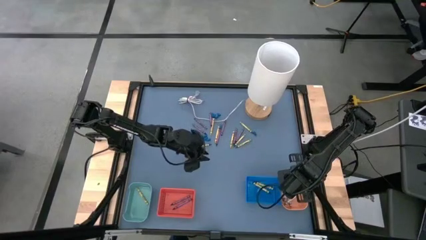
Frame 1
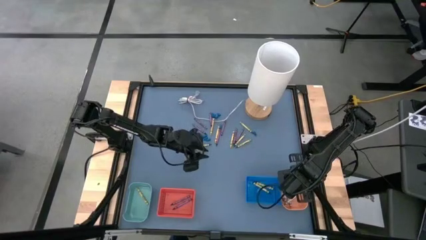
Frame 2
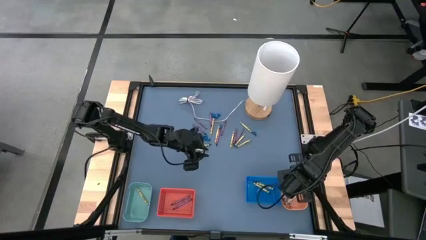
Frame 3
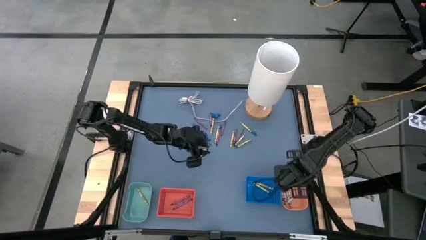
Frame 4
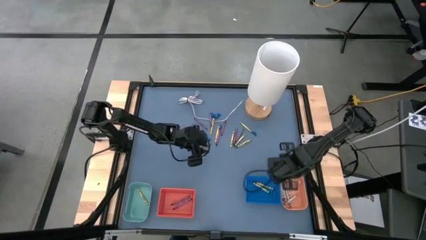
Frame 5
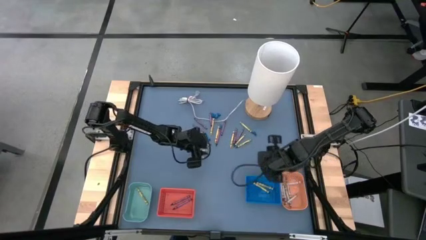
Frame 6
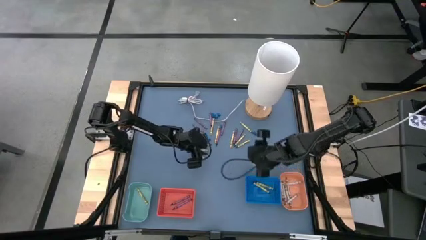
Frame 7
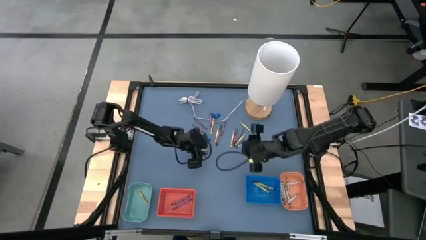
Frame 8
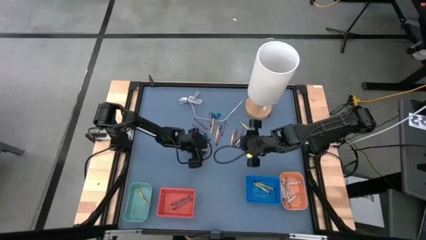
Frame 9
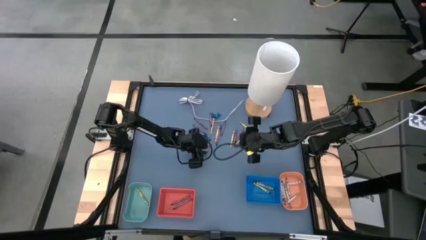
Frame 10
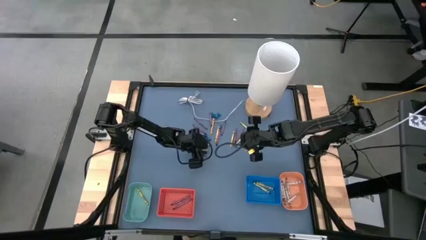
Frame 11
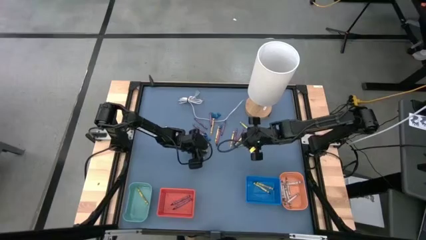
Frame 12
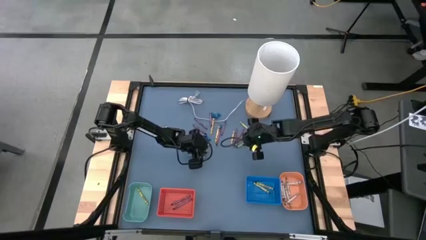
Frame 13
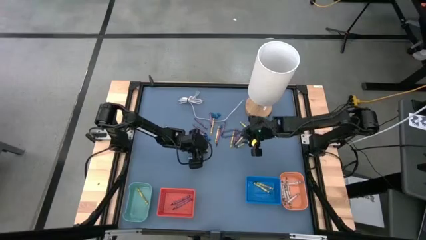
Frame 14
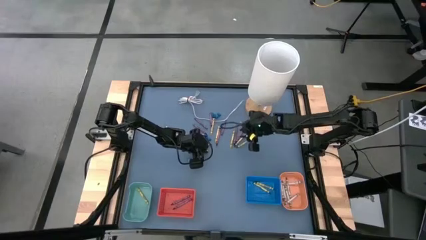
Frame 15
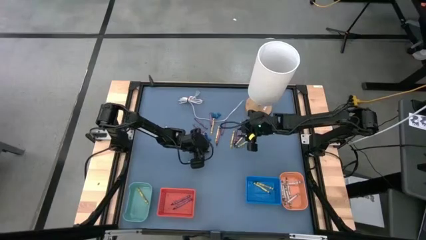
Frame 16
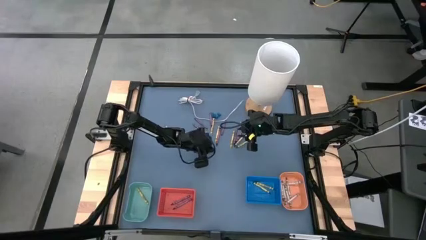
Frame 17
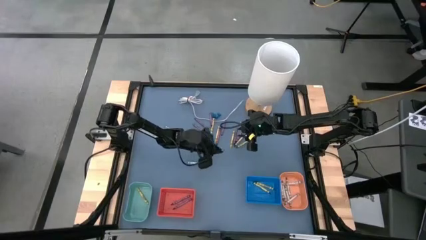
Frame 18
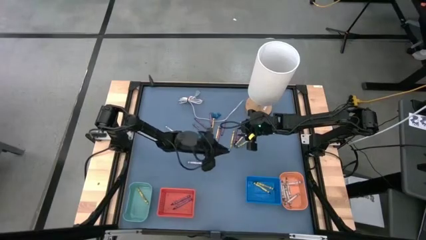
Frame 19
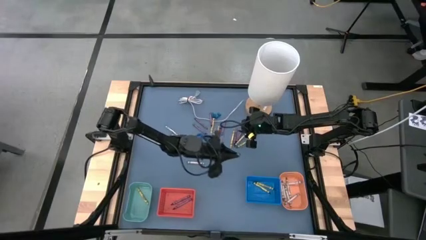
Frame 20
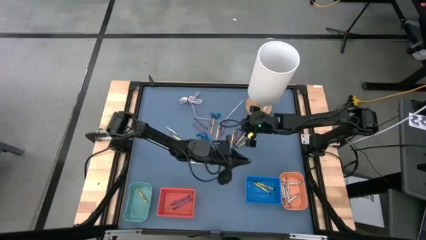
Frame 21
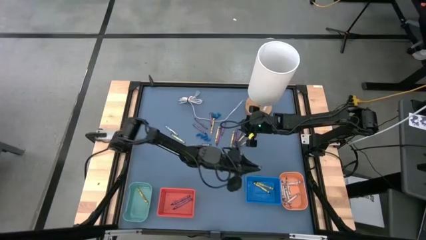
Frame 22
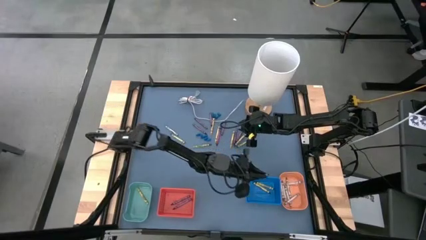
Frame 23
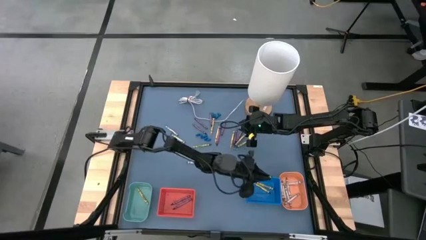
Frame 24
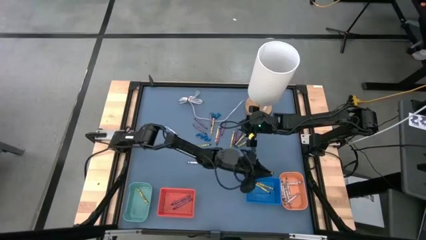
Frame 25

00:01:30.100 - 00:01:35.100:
Task: Sort crayons
Put the green crayon into the blue basket

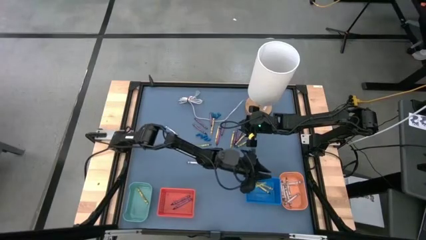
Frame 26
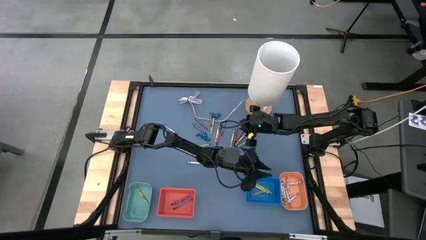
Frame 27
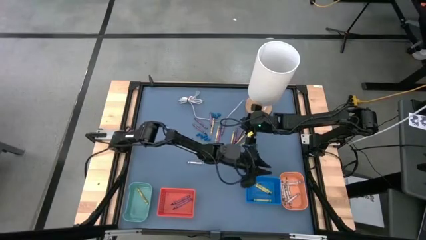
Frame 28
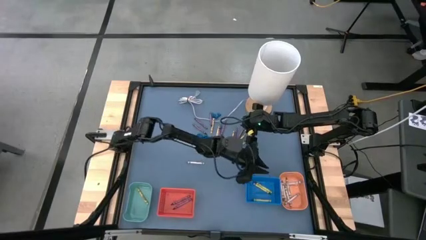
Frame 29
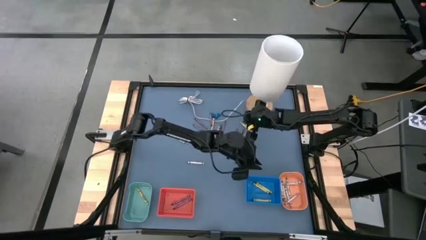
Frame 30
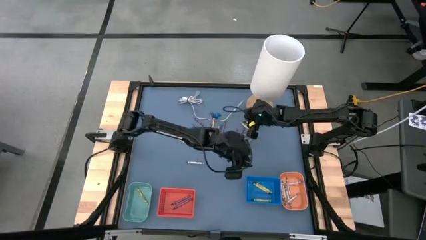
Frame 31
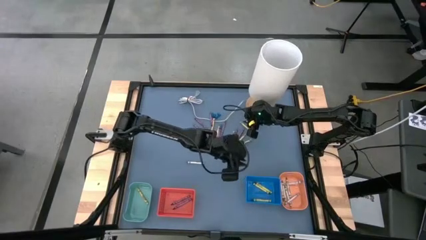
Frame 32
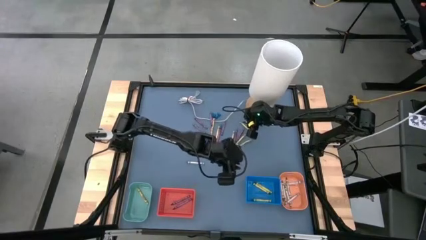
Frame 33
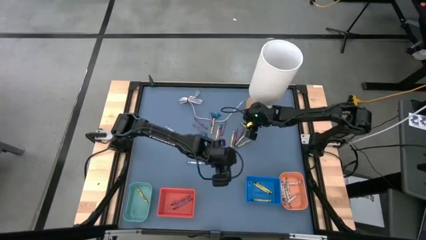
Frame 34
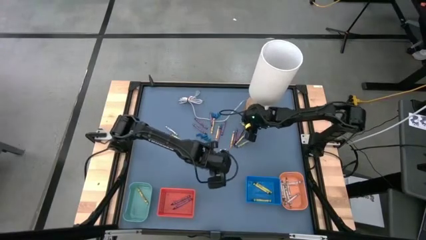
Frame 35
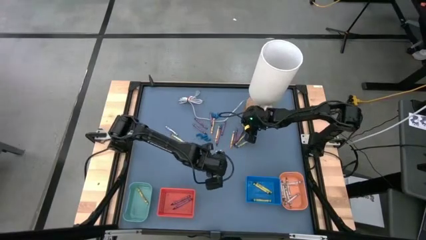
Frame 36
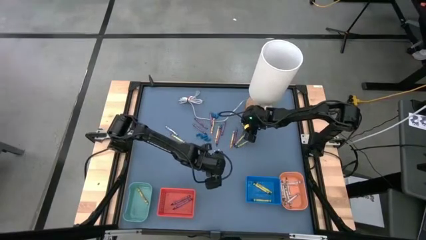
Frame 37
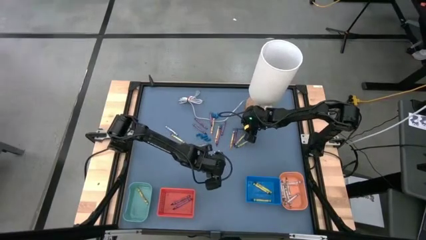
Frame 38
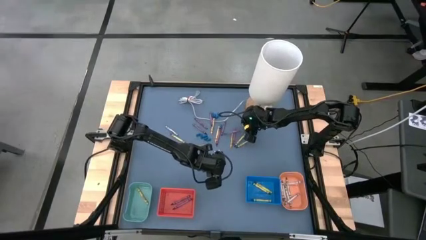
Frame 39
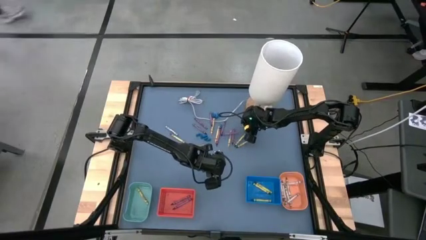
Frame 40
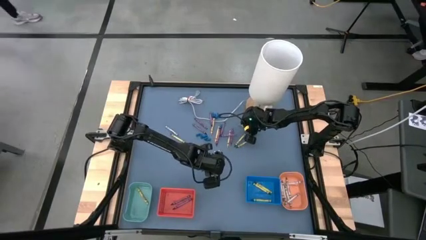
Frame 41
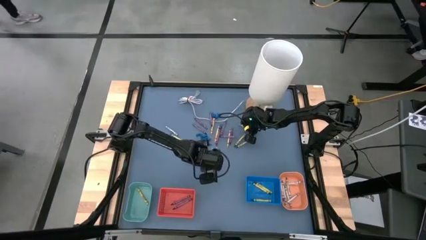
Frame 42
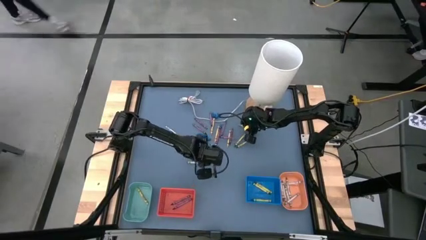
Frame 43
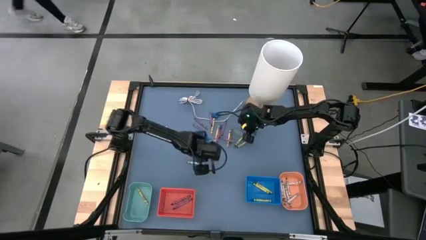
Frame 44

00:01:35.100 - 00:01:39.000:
Put the green crayon into the blue basket

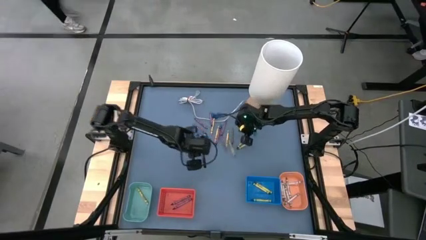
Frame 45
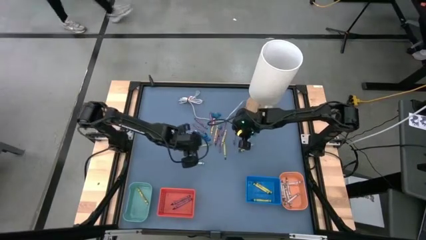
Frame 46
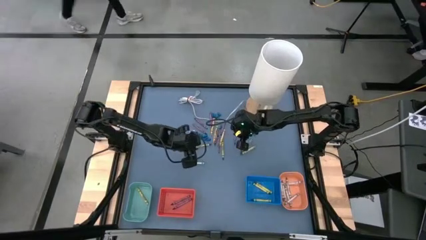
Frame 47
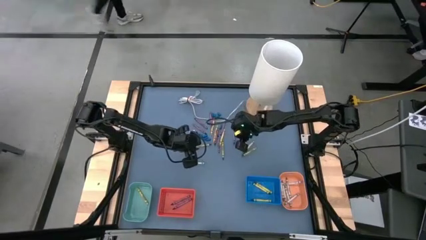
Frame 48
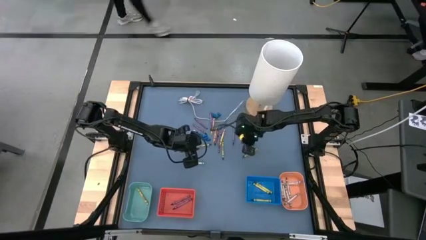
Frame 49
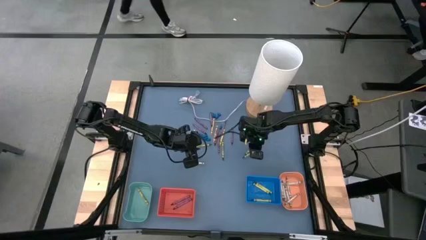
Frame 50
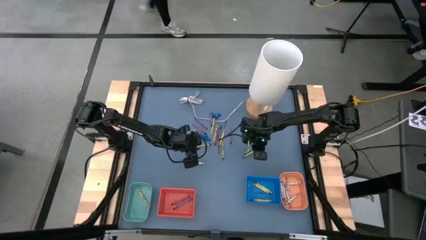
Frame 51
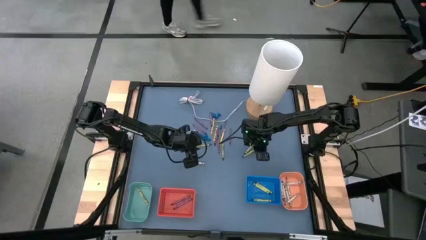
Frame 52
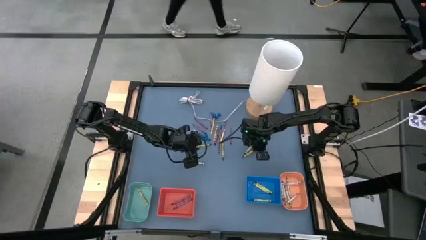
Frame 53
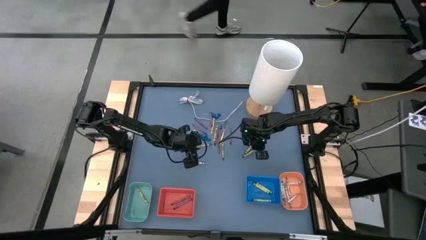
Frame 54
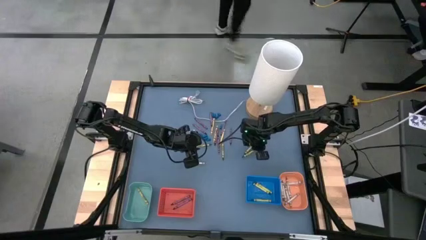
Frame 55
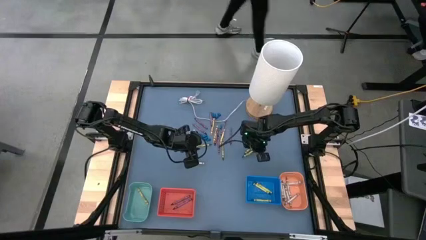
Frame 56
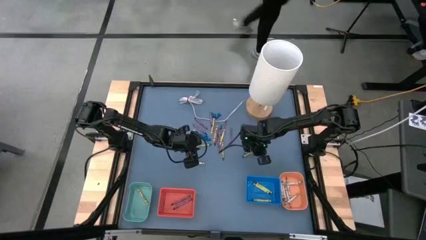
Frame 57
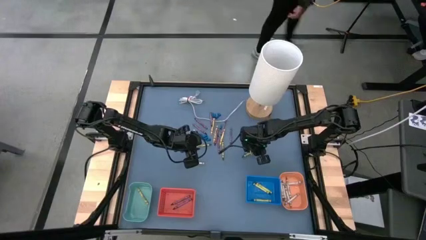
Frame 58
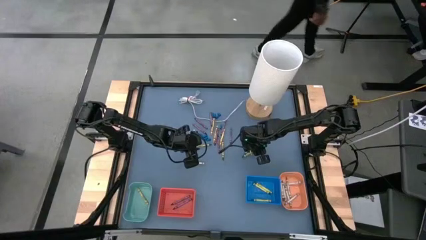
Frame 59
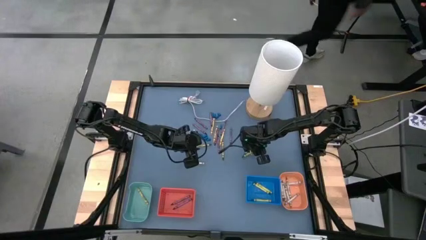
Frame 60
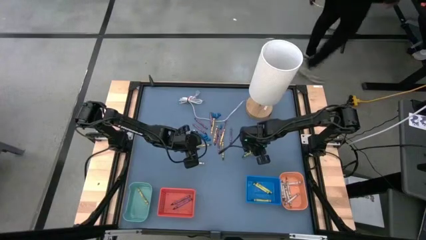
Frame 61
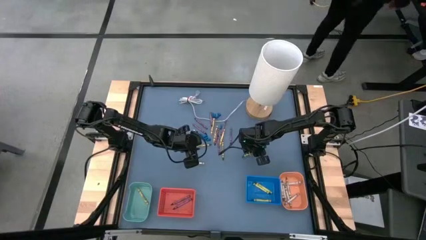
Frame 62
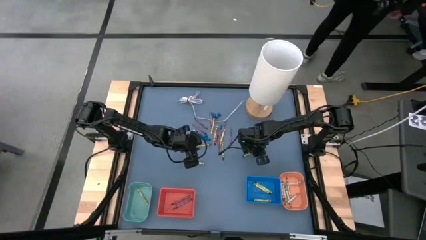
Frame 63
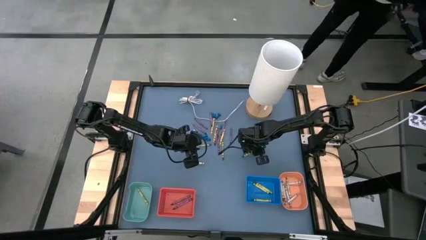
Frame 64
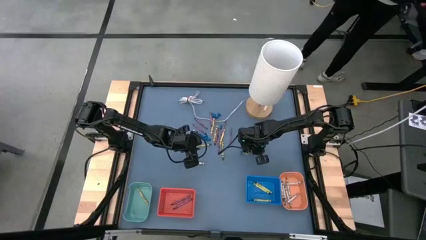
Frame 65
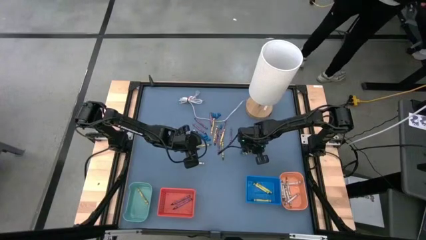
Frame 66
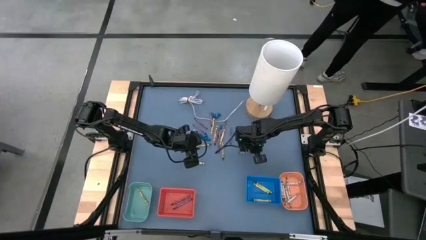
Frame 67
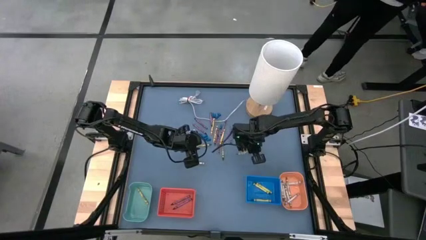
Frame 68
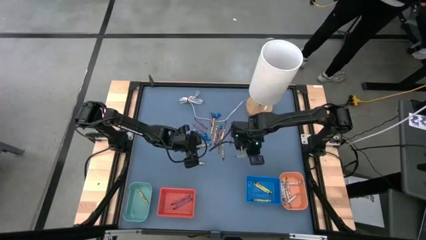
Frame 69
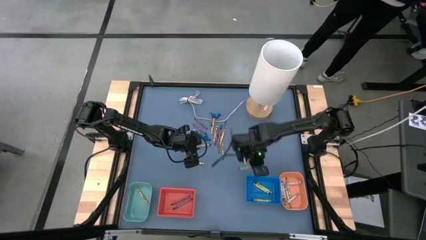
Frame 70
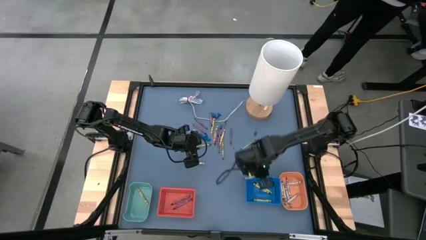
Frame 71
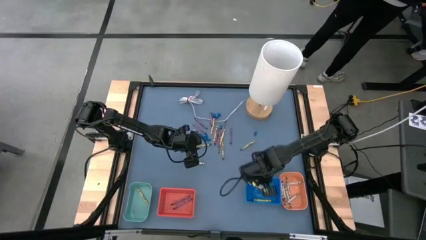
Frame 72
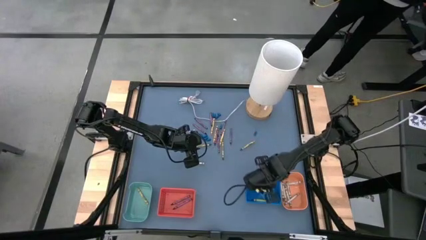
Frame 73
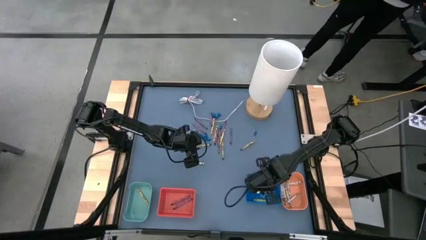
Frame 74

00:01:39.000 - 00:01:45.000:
Put the green crayon into the blue basket
